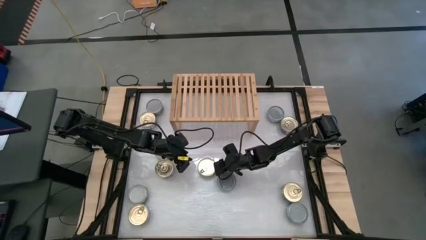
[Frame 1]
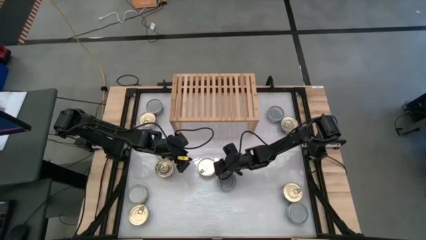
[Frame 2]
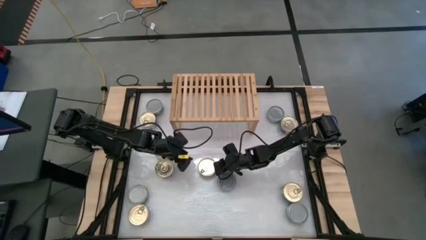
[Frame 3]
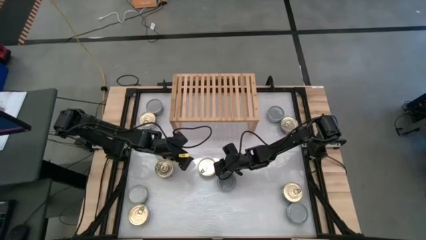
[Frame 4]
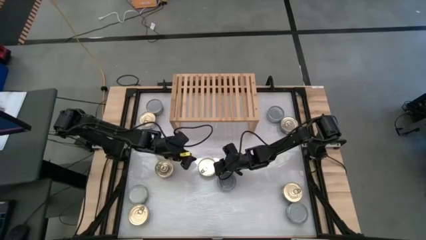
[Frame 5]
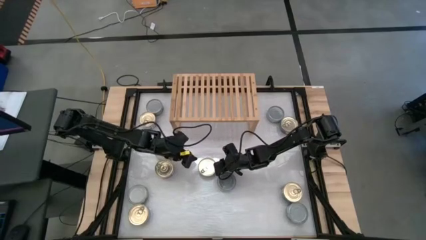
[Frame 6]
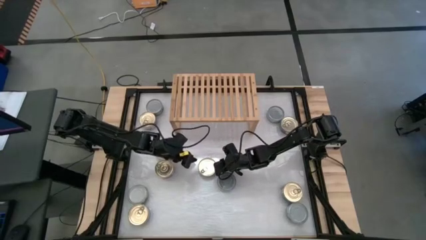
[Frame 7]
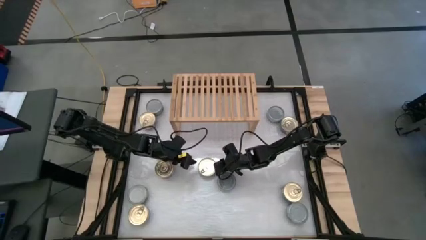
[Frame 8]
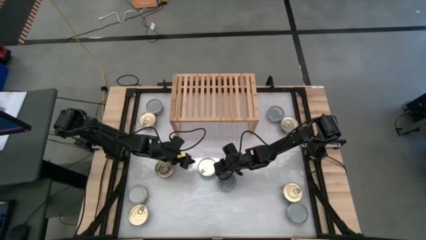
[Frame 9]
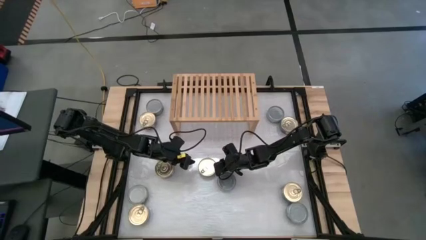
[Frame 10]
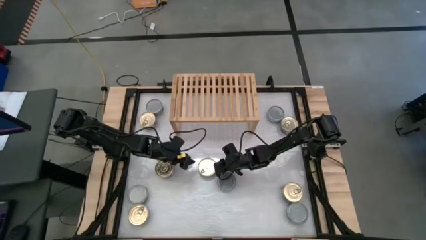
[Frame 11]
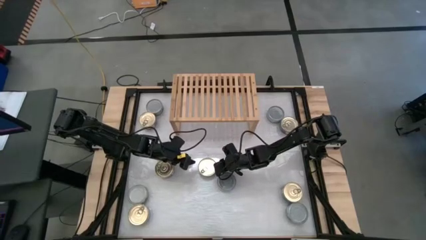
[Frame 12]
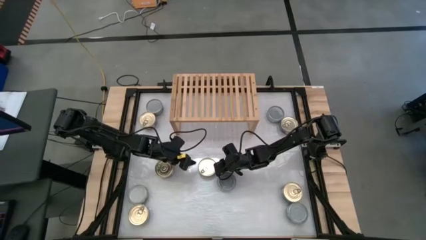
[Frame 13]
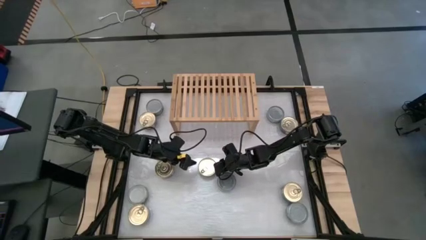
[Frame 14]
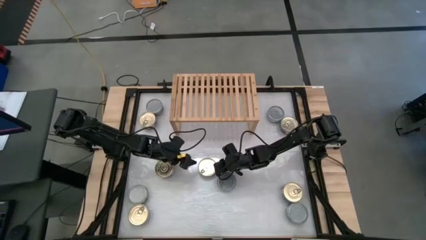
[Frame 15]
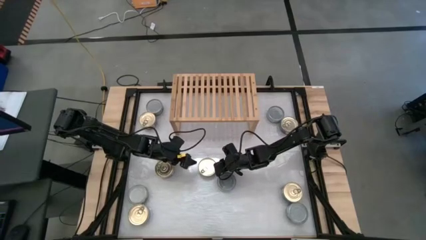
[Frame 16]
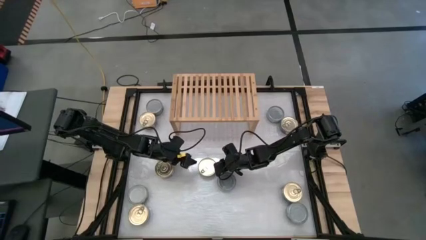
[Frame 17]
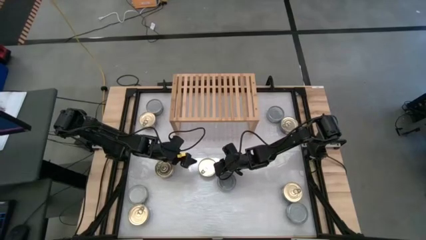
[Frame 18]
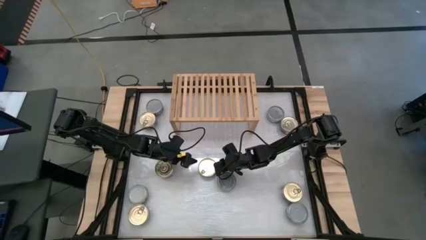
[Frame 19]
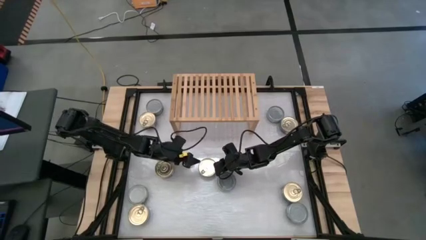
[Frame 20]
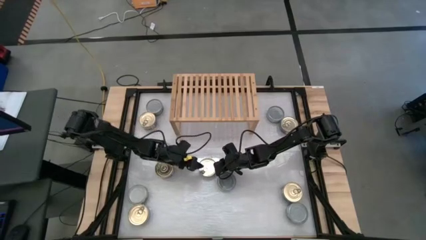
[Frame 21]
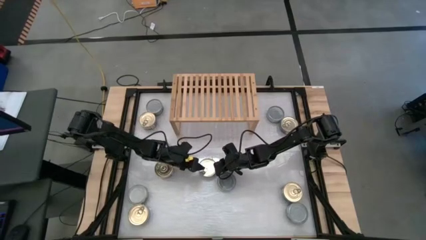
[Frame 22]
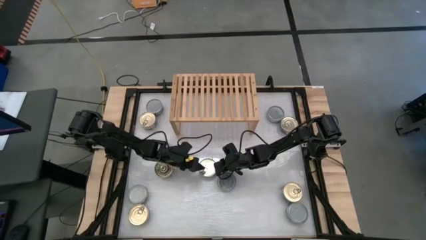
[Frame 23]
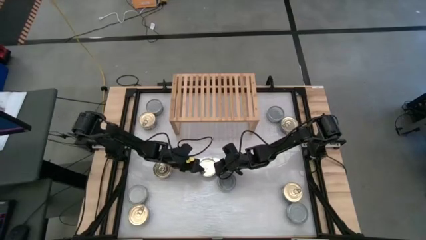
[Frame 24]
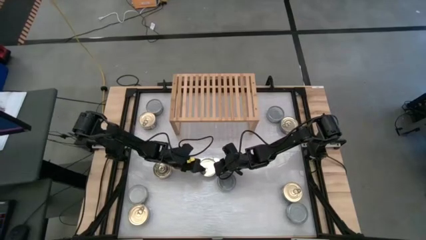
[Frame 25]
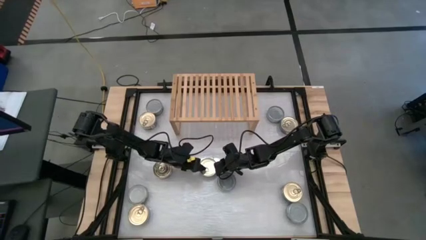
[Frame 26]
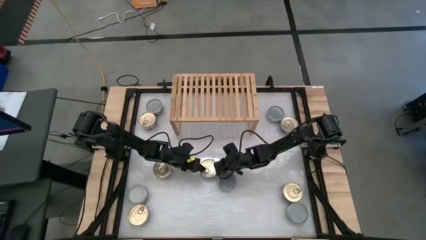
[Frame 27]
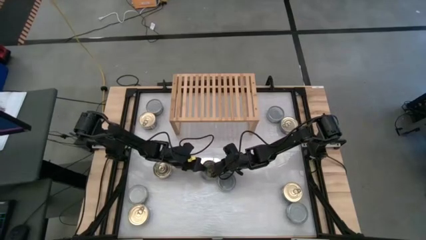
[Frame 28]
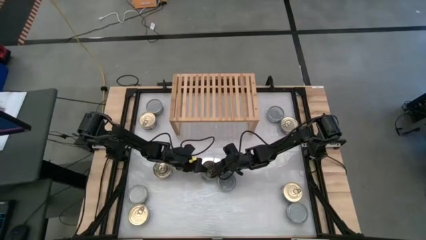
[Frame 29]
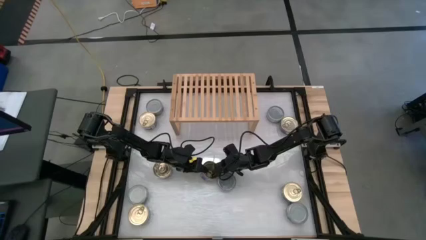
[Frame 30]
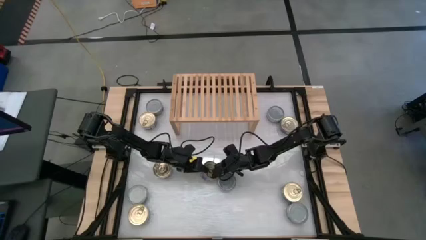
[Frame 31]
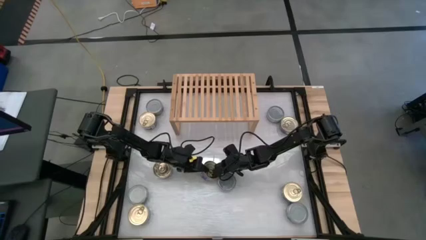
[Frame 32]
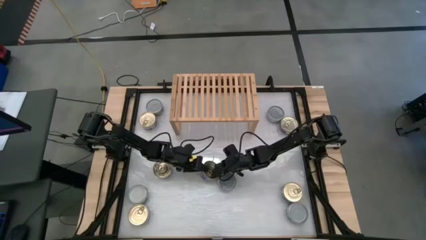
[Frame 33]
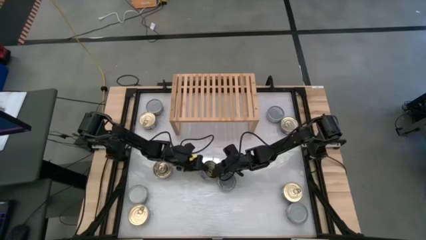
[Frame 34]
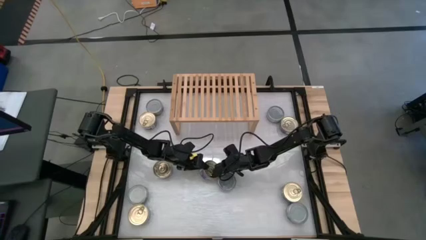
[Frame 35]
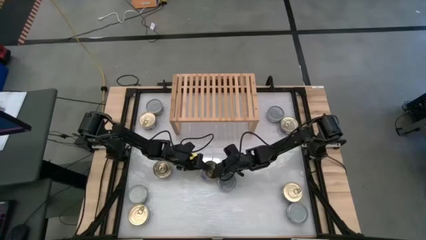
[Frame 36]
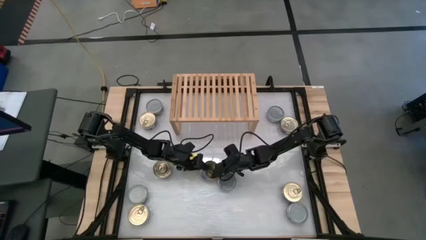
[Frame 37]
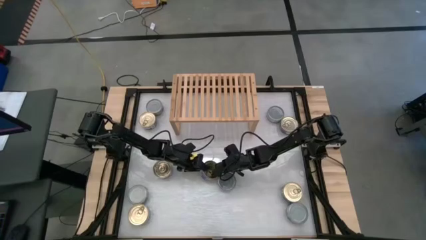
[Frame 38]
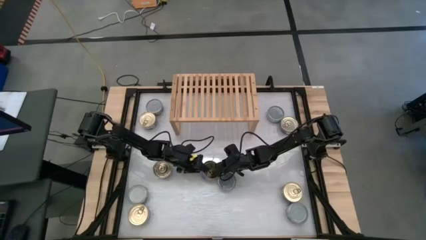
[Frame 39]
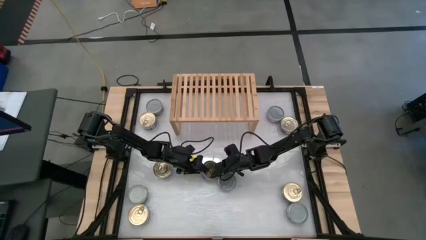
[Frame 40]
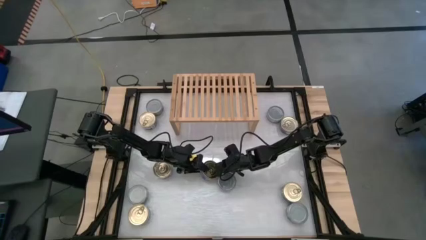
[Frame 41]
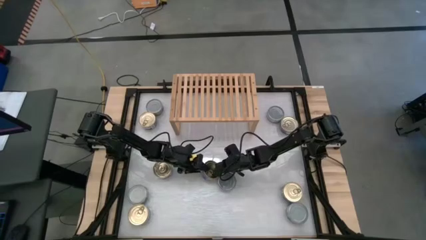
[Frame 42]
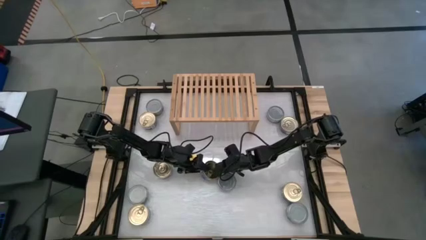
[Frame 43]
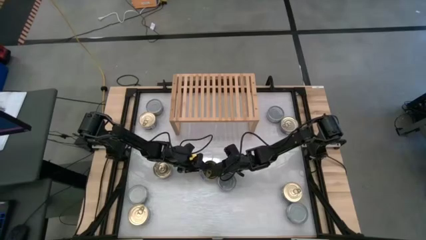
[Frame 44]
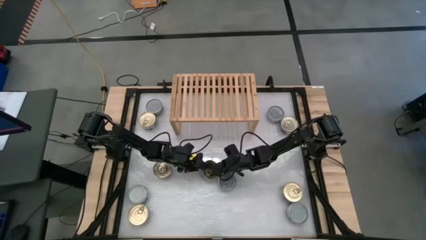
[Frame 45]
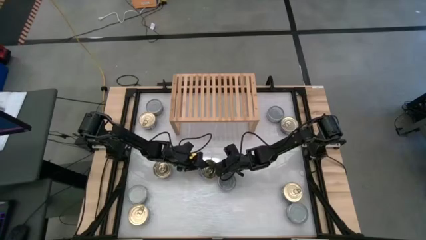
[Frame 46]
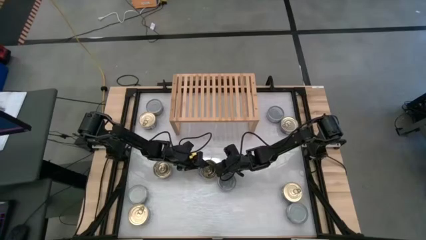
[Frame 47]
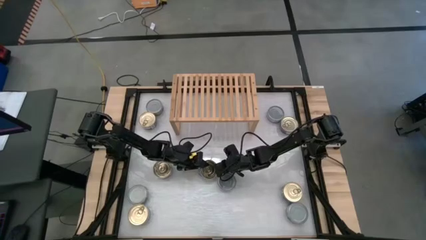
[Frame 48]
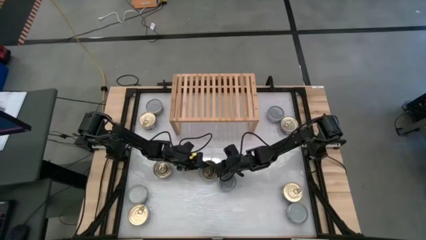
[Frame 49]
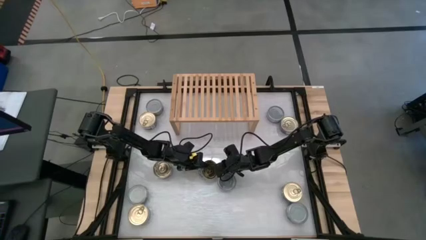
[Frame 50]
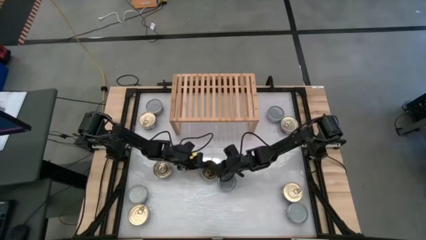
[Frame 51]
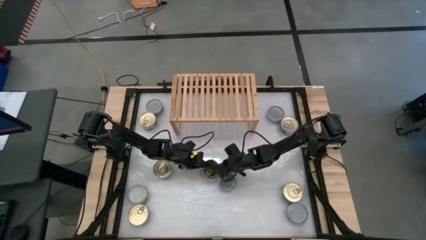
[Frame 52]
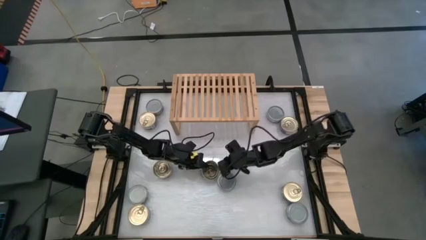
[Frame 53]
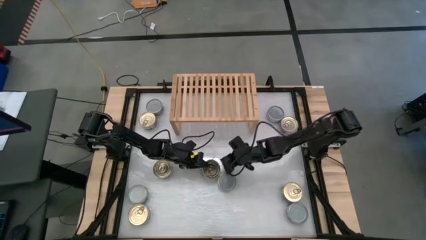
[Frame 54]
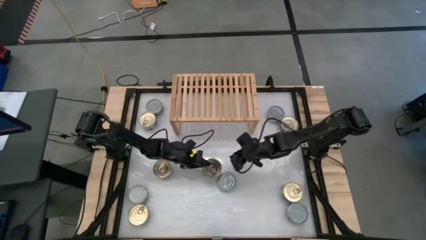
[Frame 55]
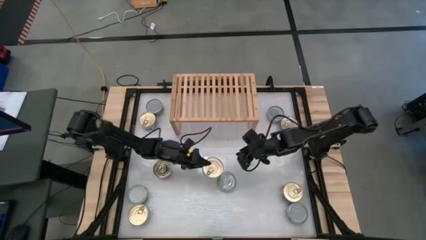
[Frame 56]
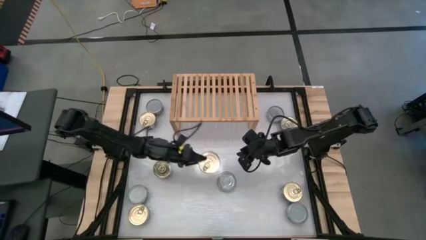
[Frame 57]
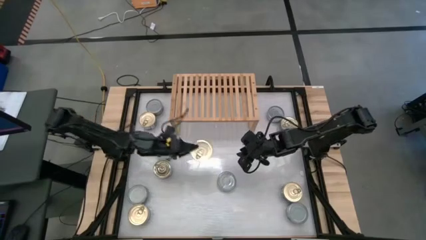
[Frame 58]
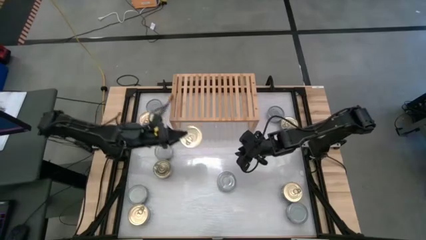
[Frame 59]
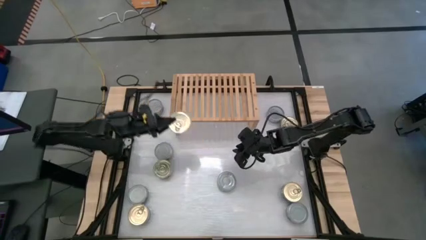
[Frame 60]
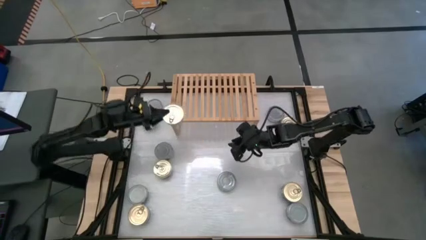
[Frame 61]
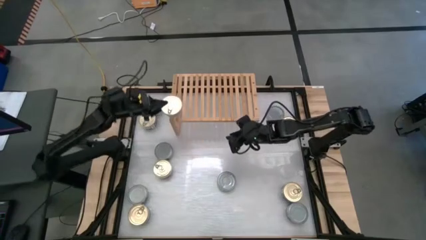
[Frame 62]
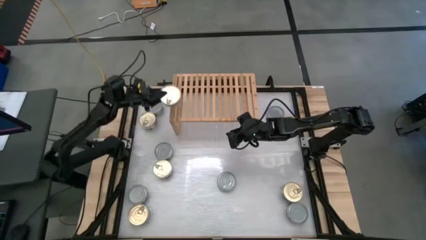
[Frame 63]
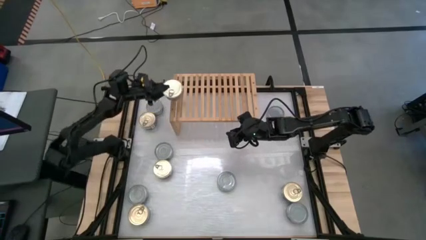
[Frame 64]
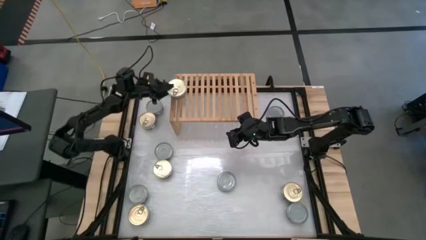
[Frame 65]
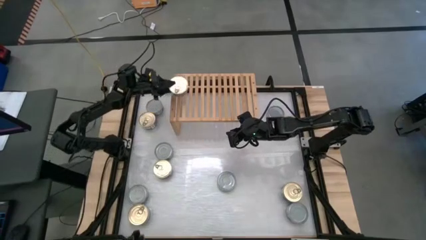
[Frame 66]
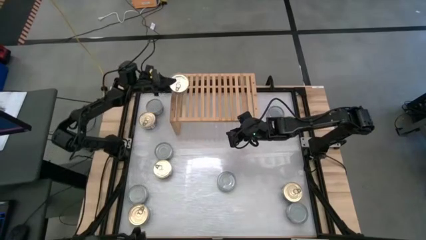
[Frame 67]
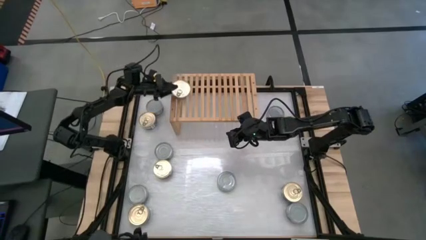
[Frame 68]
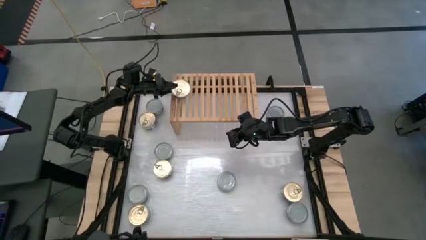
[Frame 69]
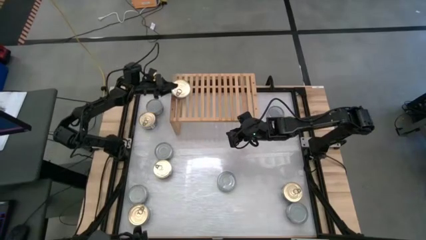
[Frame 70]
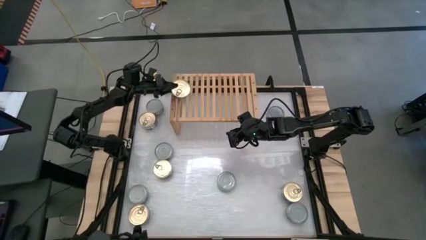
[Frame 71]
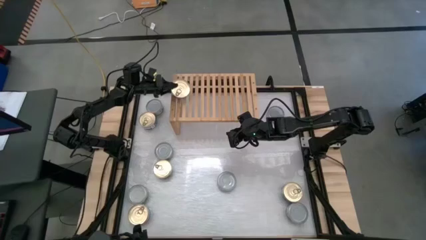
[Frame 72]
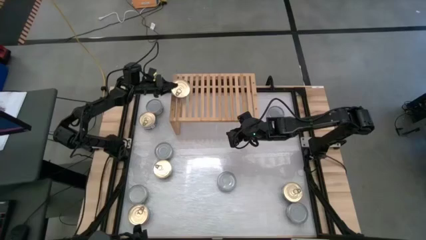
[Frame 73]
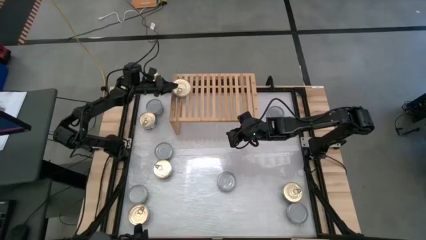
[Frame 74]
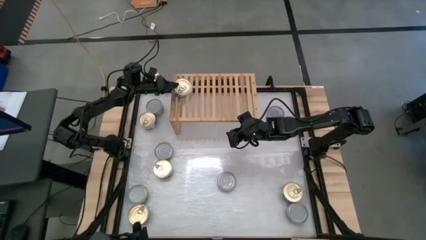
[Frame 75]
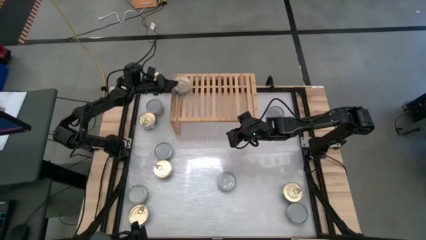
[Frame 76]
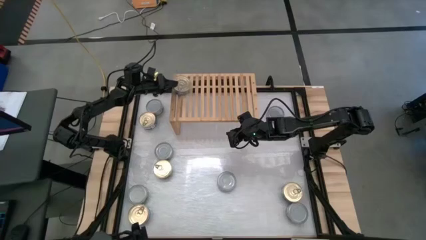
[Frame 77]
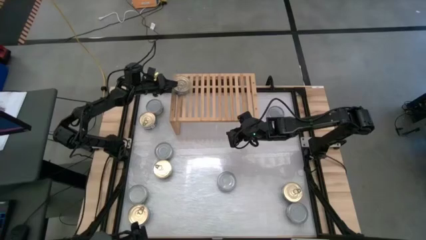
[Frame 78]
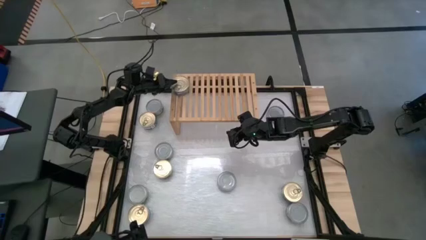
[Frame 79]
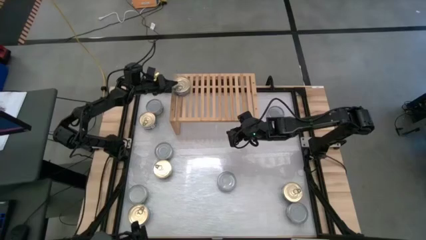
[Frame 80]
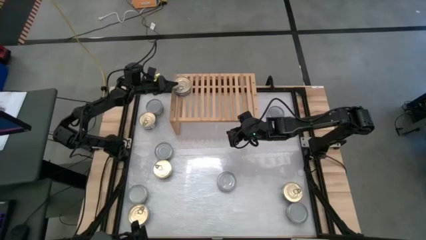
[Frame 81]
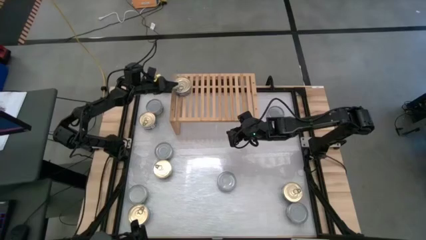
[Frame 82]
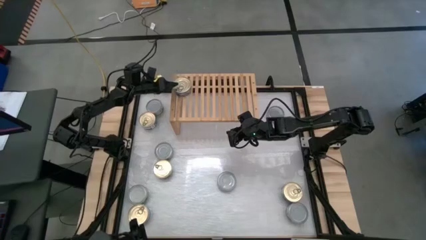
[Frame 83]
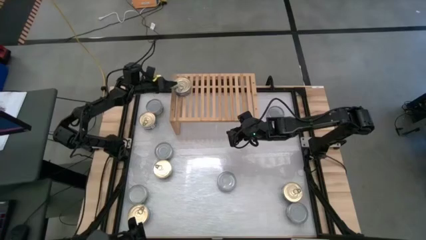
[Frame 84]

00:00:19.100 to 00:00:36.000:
Task: Stack canned seafood by type on shelf
Put the blue-pink tuna can on the shelf
